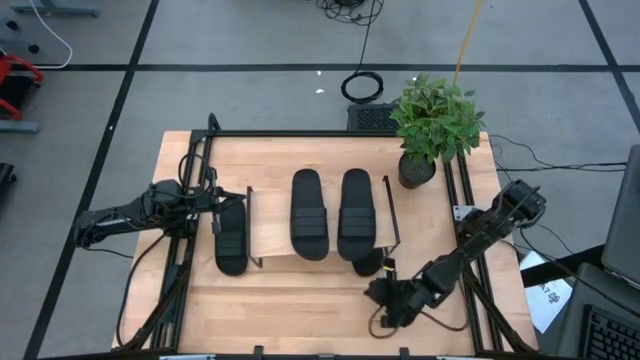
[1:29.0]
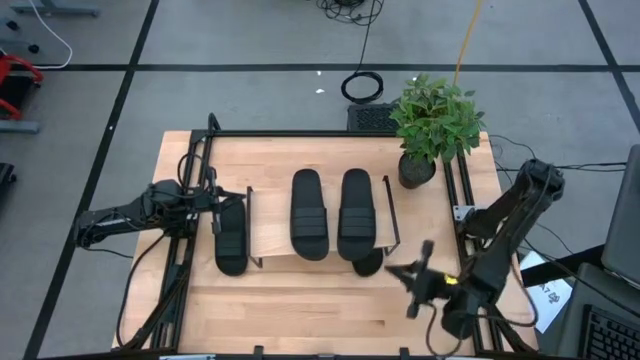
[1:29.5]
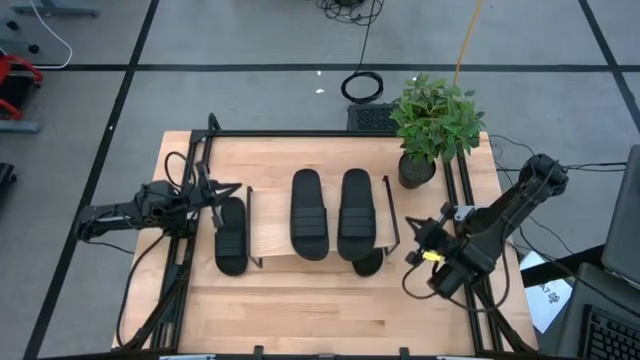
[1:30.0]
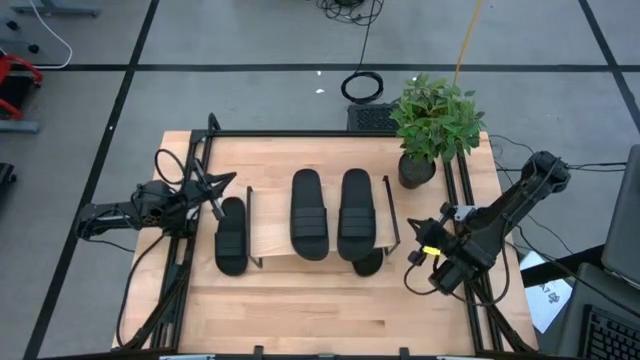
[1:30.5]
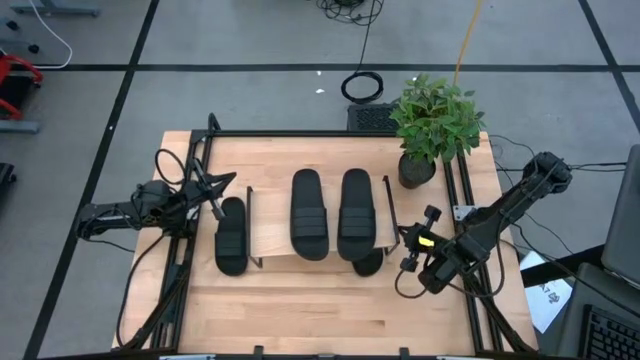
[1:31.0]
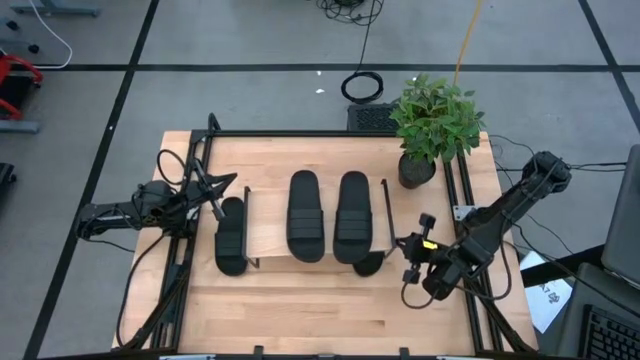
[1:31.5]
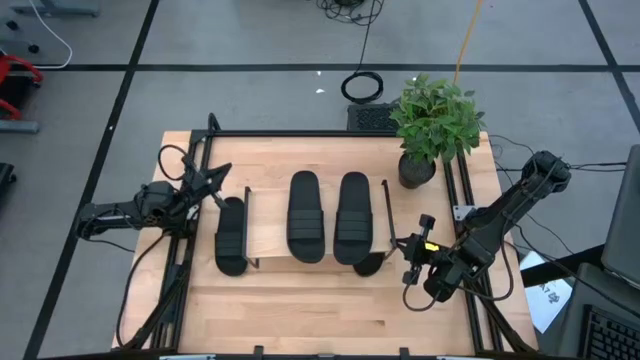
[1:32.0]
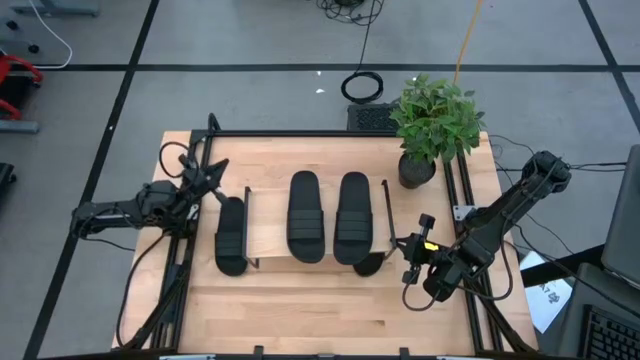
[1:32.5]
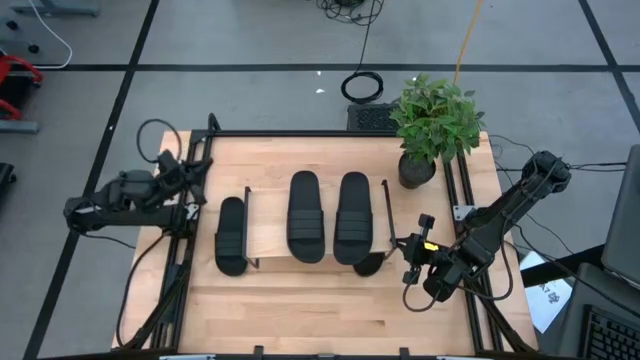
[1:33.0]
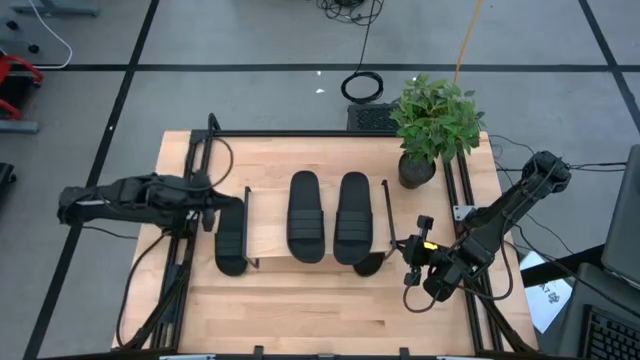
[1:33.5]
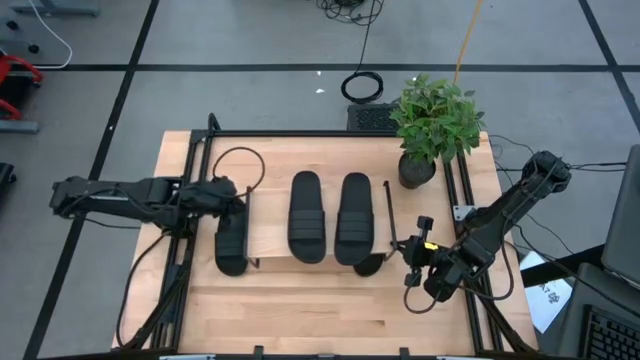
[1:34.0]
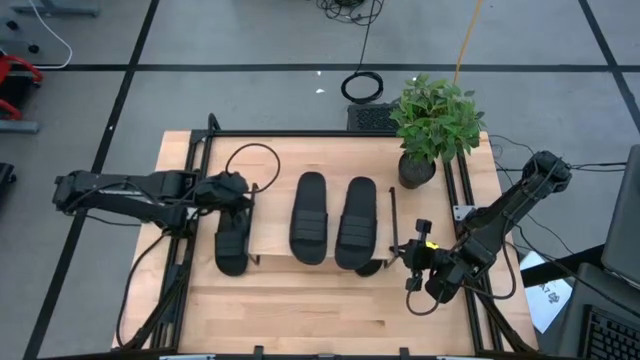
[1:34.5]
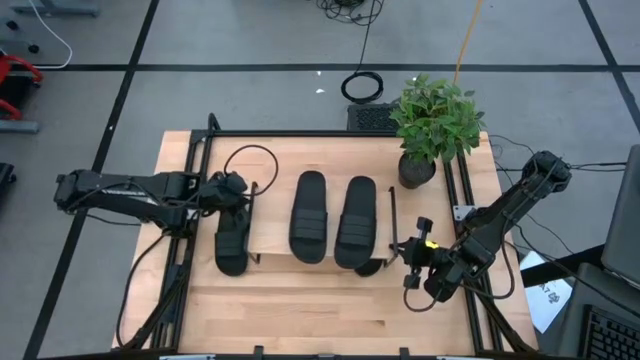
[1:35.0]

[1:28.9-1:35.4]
Task: Pick and place slides into the shelf
Adjust the shelf

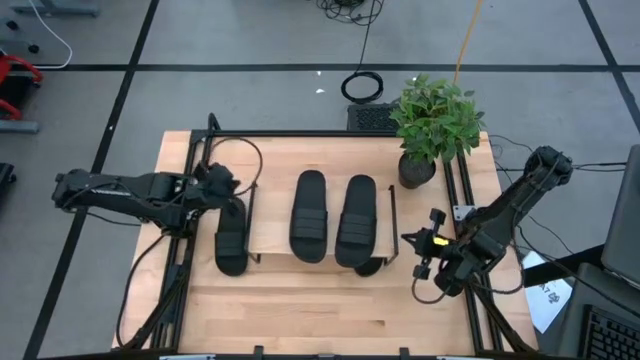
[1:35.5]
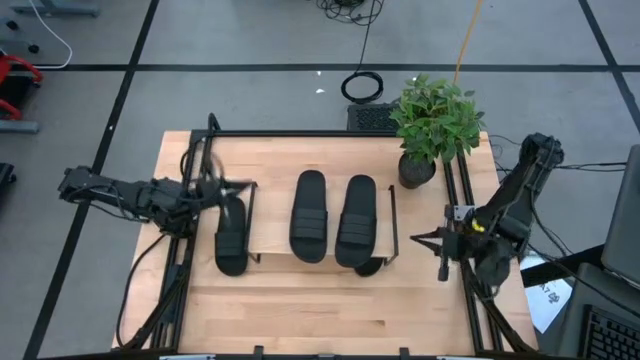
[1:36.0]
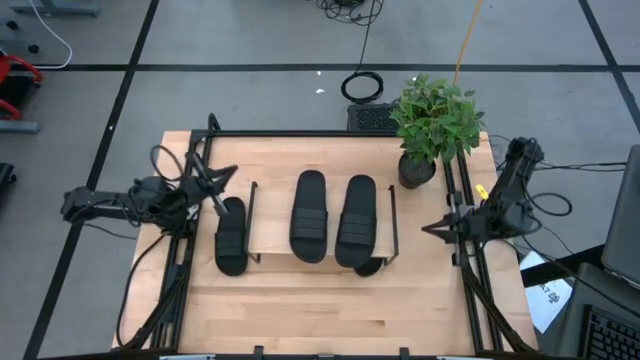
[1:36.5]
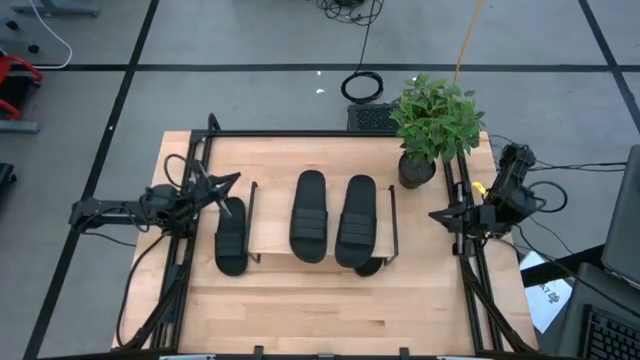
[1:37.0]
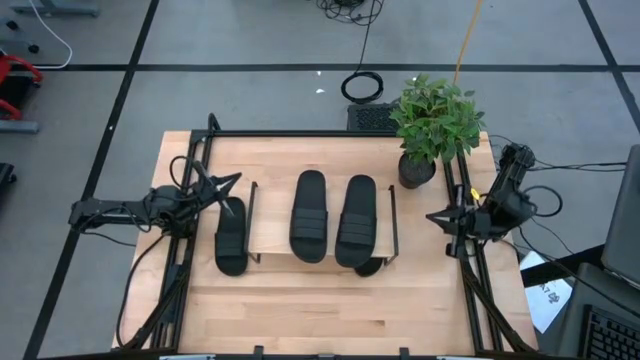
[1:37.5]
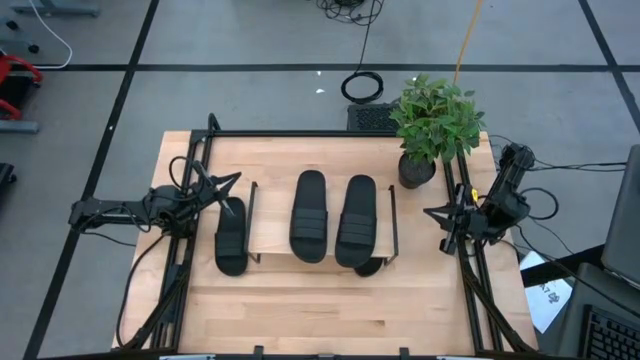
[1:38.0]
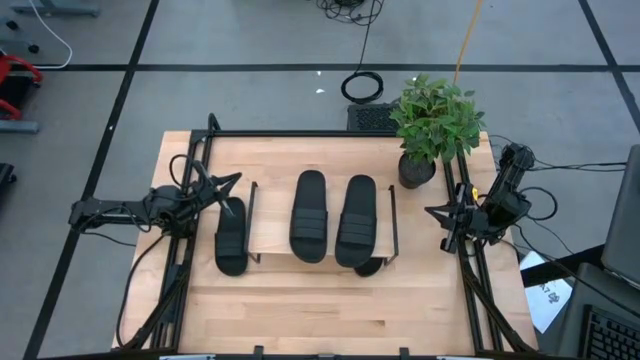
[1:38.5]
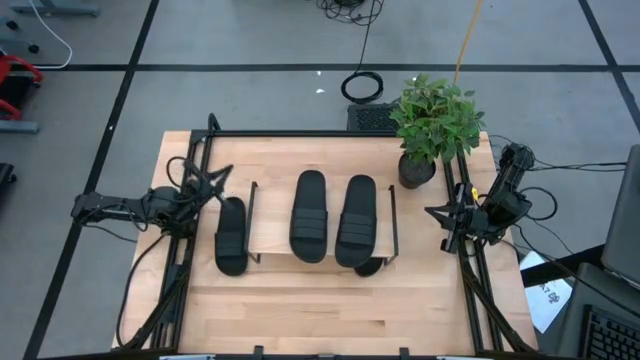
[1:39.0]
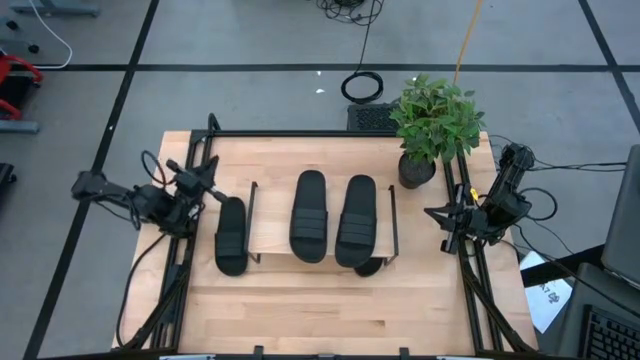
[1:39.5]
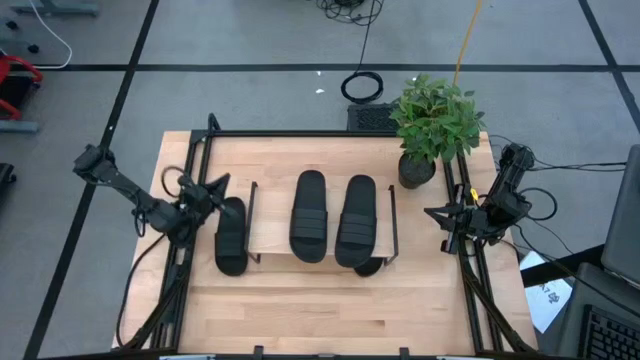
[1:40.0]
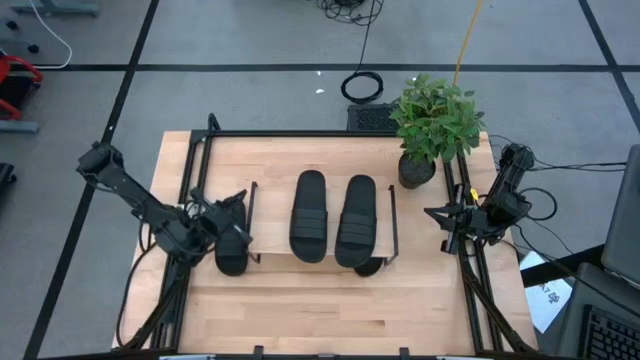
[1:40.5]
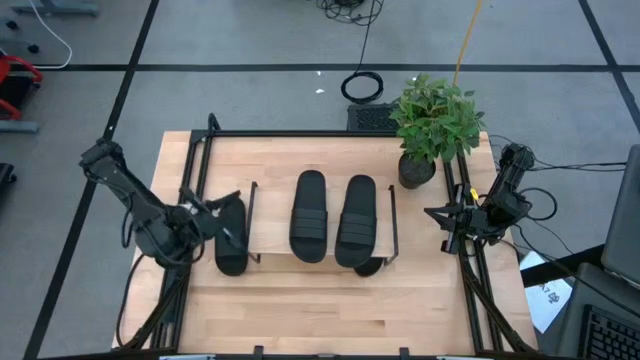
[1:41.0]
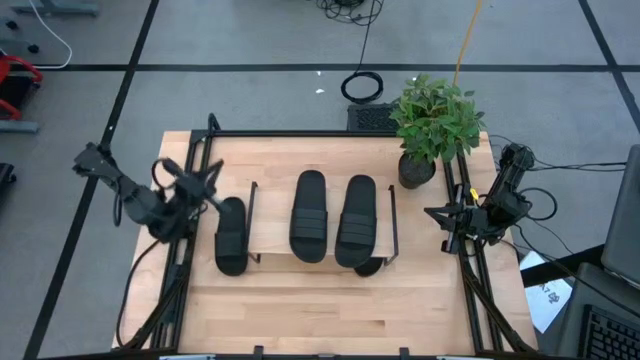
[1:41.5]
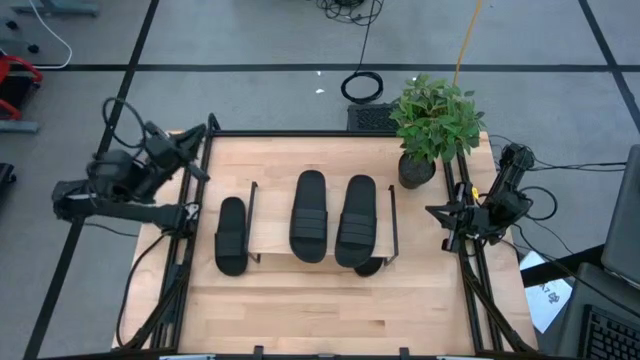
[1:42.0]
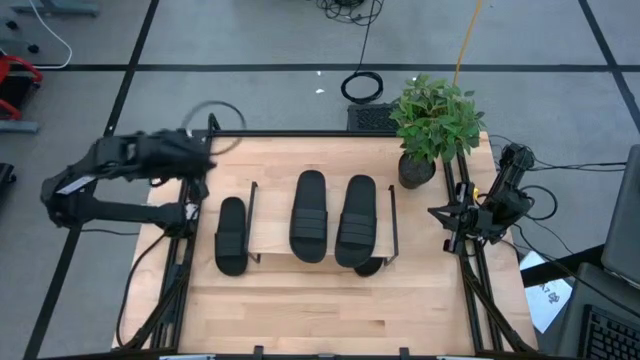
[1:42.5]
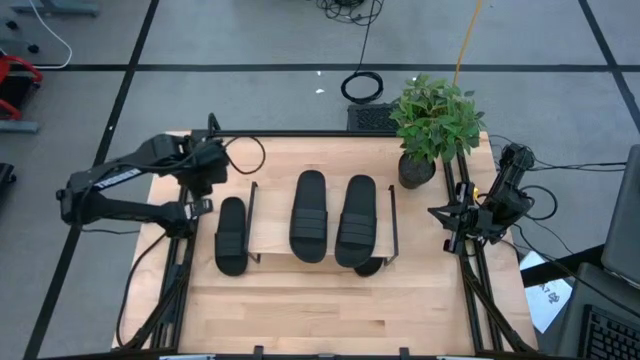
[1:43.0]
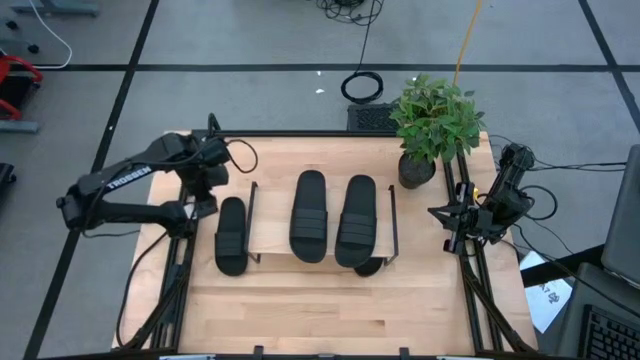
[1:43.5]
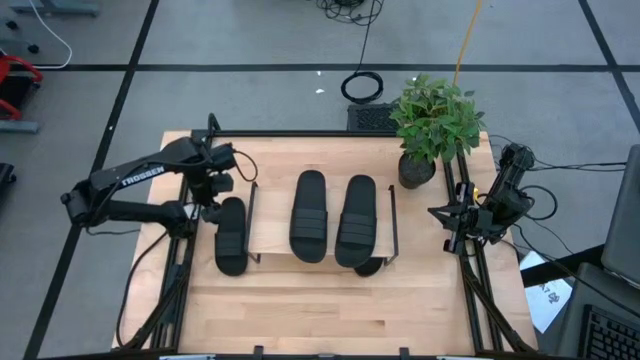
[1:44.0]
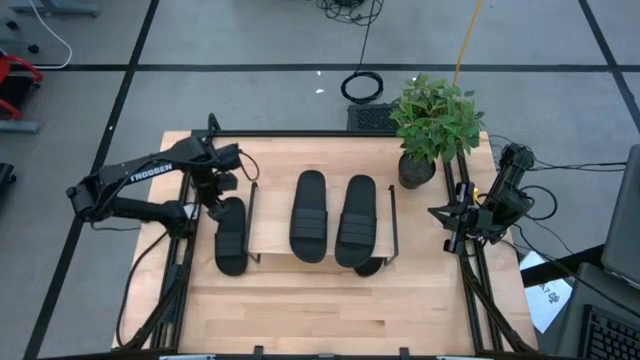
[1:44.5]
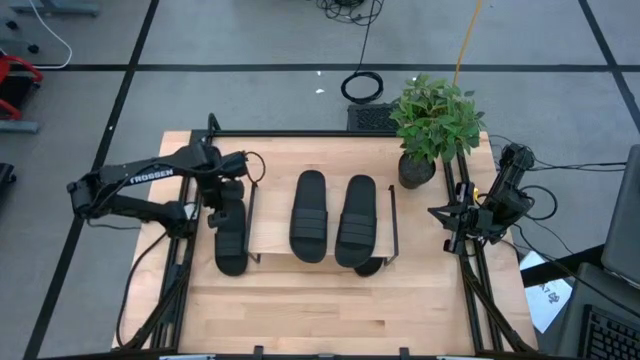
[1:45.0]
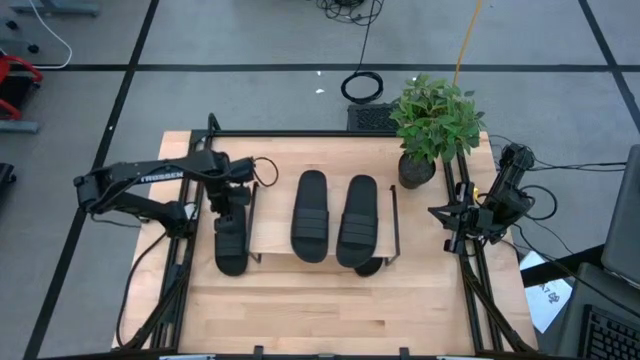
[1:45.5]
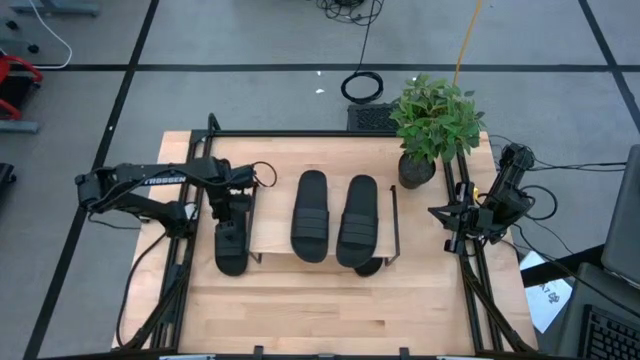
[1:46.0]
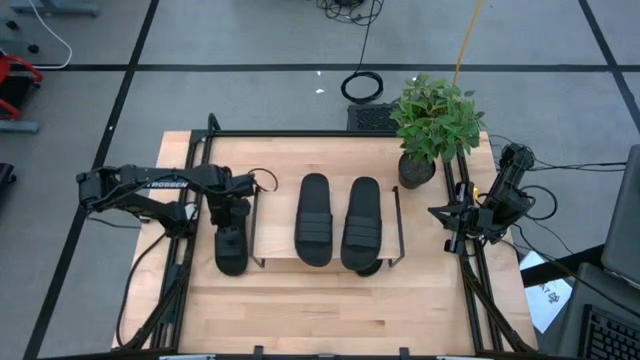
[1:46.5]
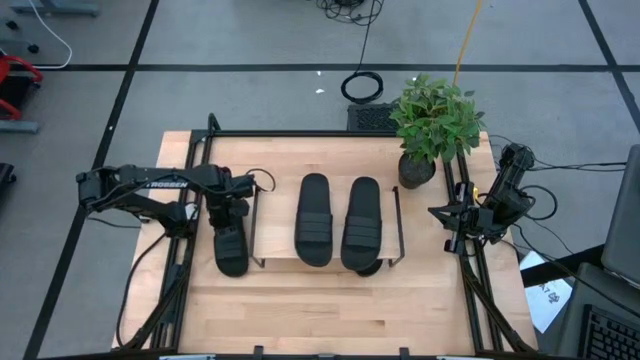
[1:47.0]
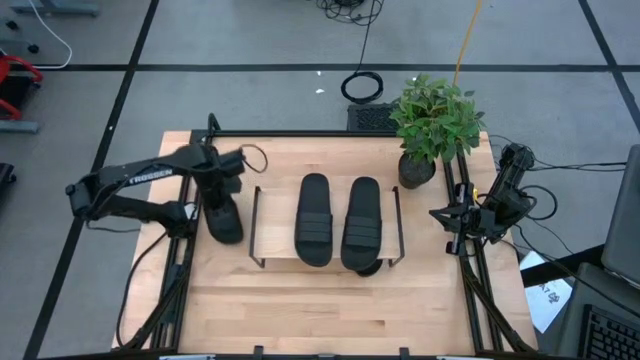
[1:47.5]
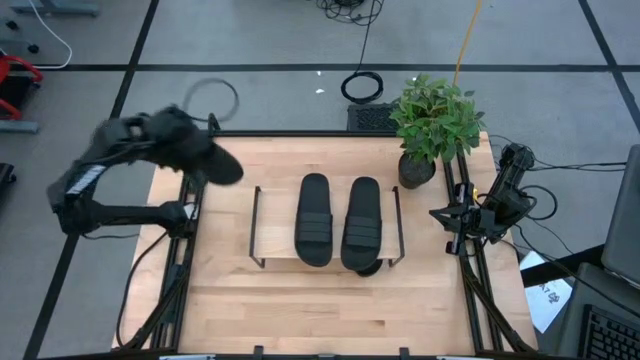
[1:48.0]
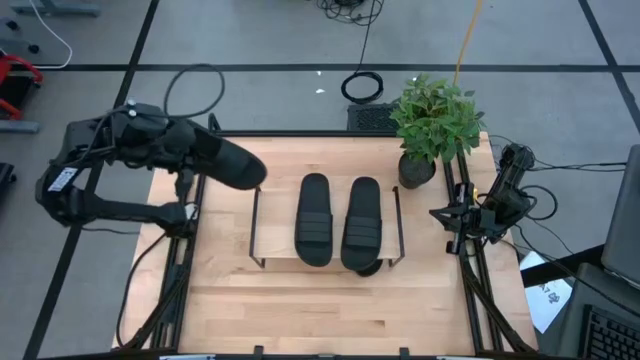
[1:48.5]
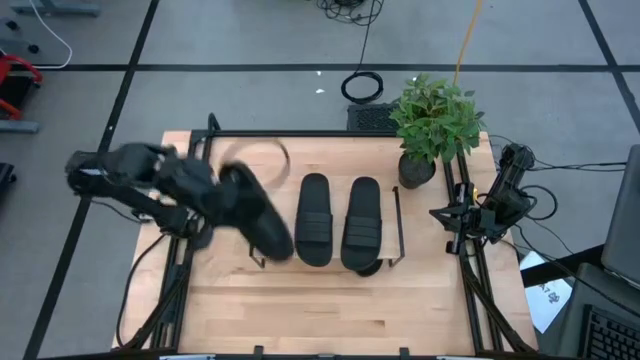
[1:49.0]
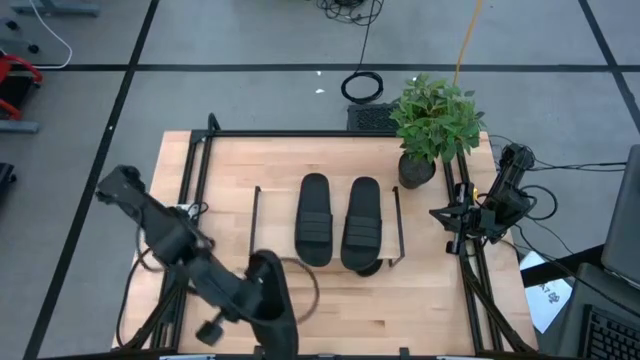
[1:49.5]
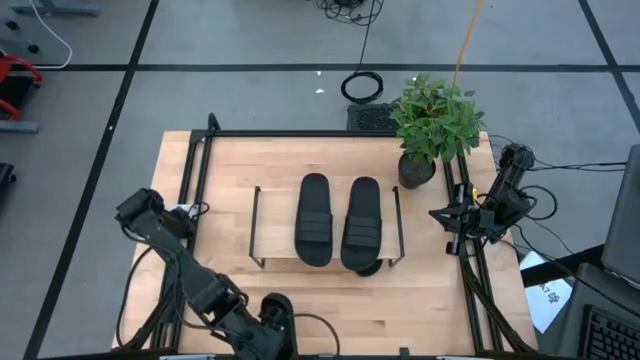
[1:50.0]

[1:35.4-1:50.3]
Put the black slide under the shelf
